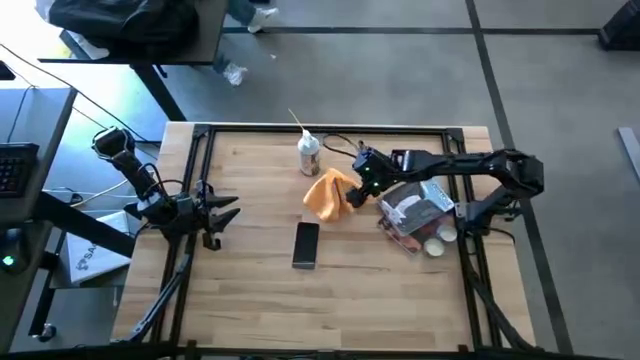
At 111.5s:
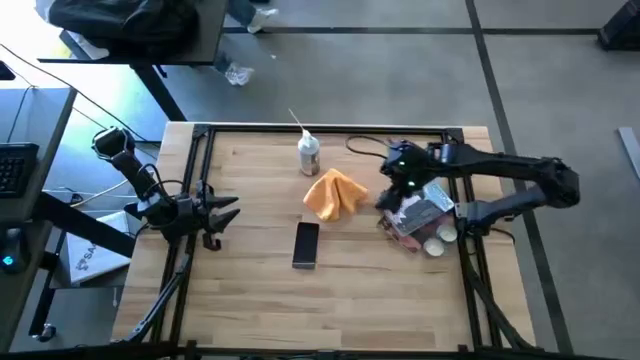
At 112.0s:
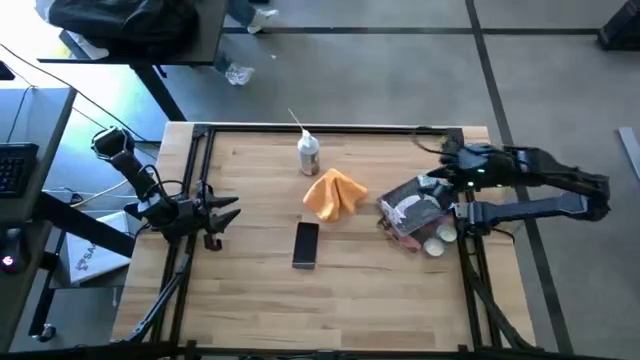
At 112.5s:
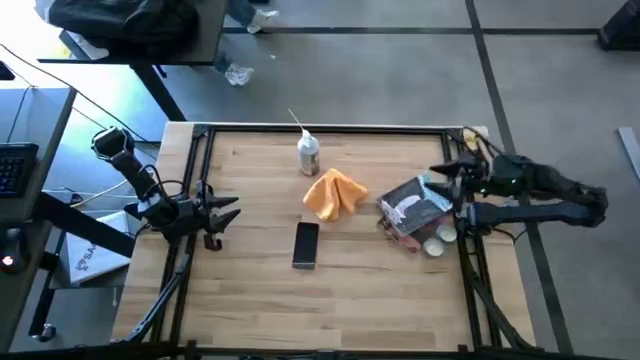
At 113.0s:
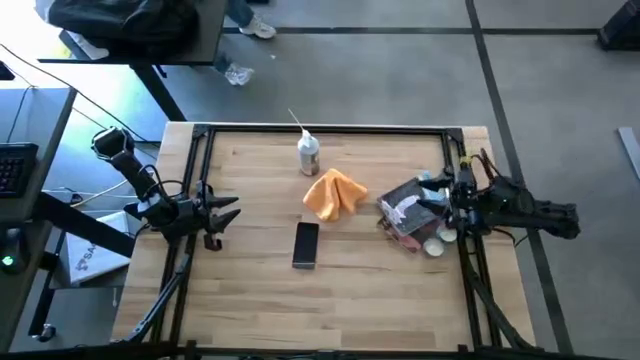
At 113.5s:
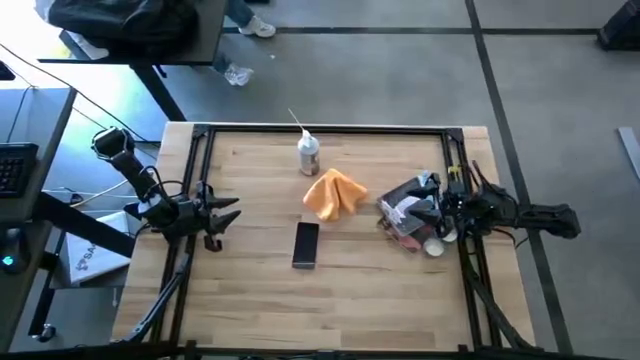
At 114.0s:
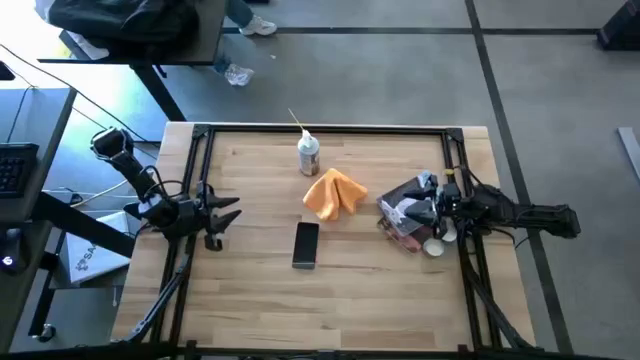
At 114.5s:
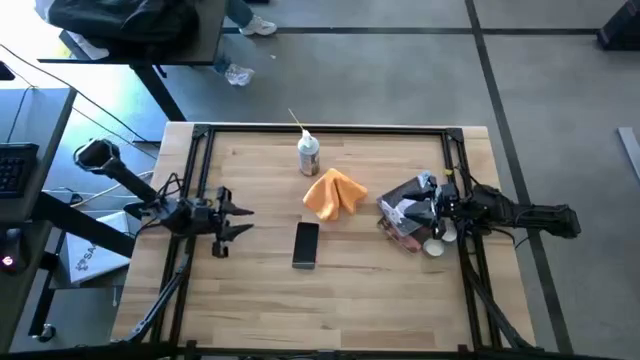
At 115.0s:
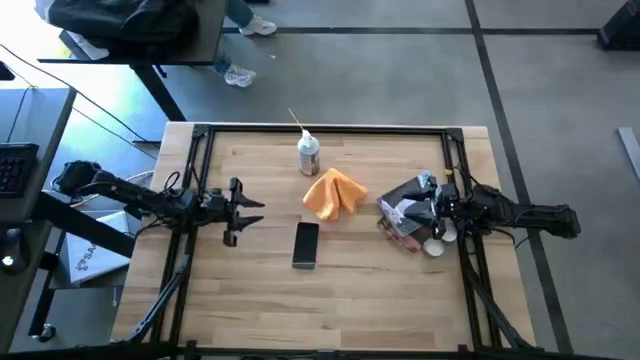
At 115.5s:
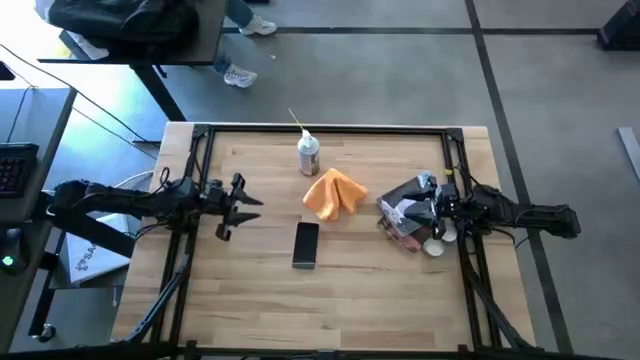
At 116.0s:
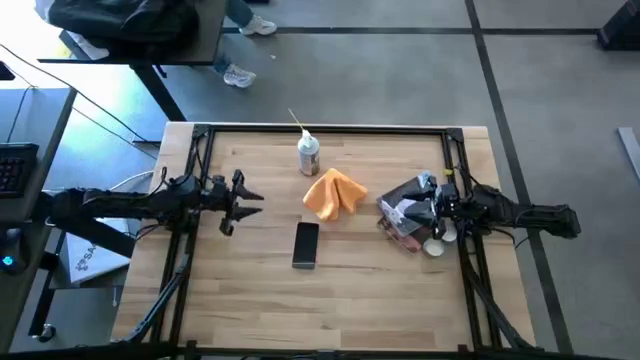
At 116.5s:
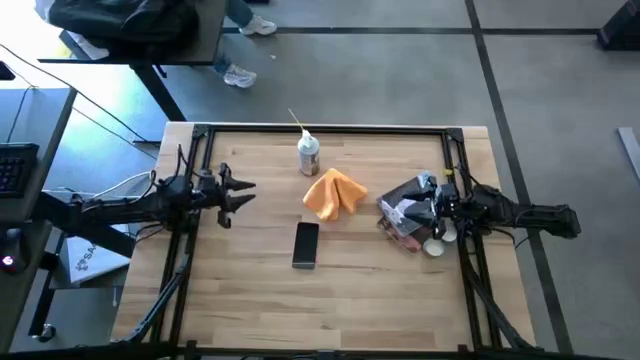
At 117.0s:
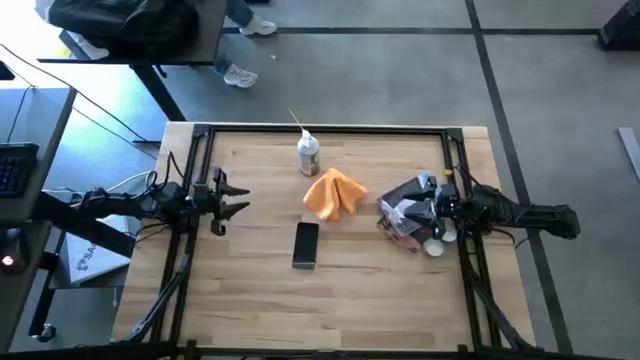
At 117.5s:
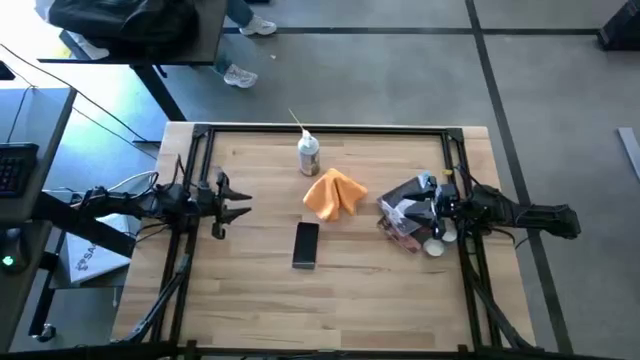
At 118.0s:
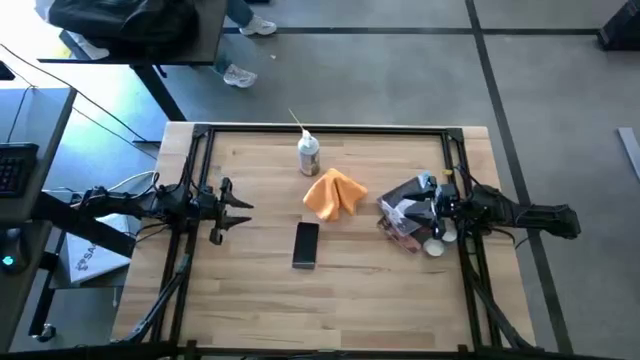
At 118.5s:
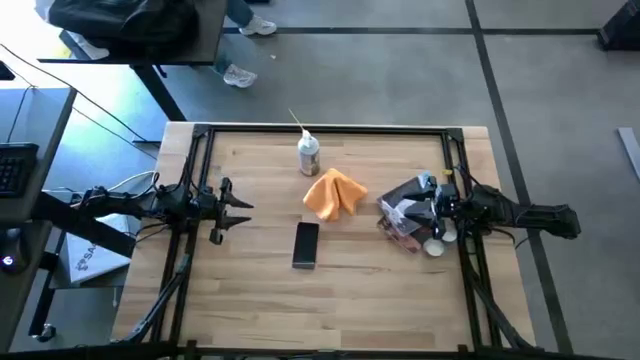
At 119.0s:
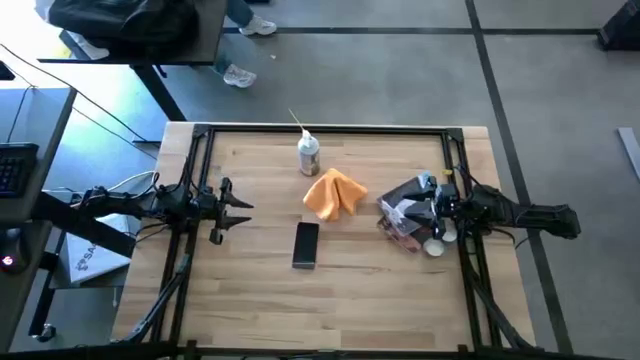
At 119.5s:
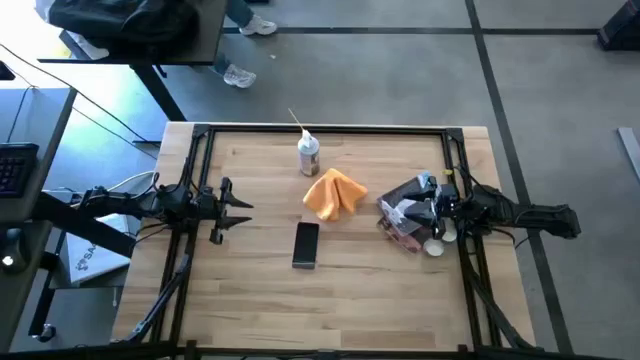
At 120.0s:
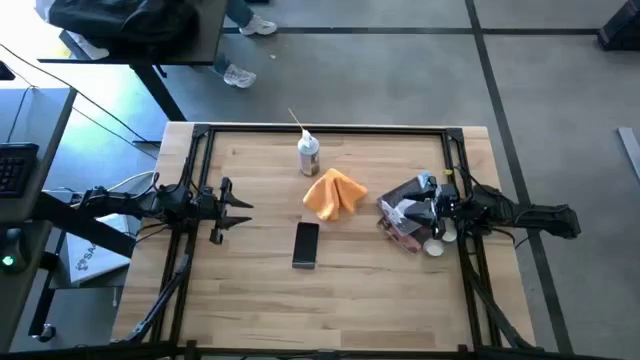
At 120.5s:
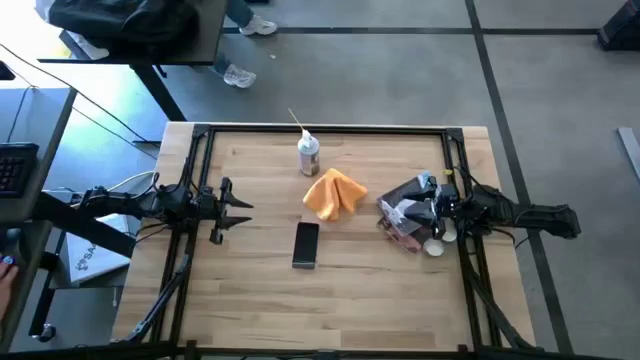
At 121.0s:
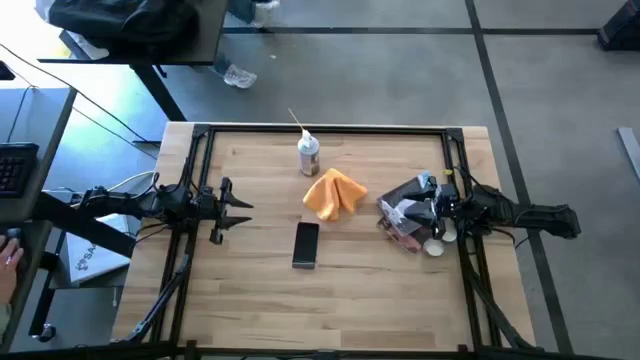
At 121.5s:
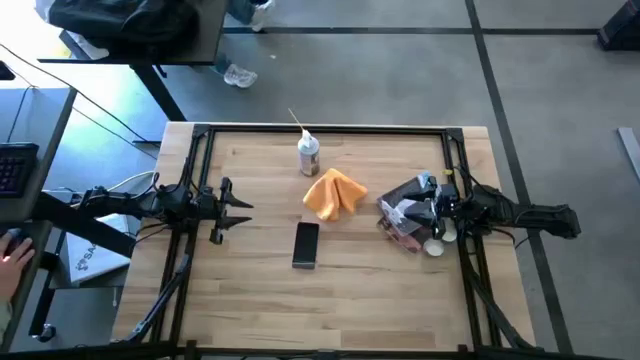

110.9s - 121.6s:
Task: Apply microfiber cloth
Return to Home Position

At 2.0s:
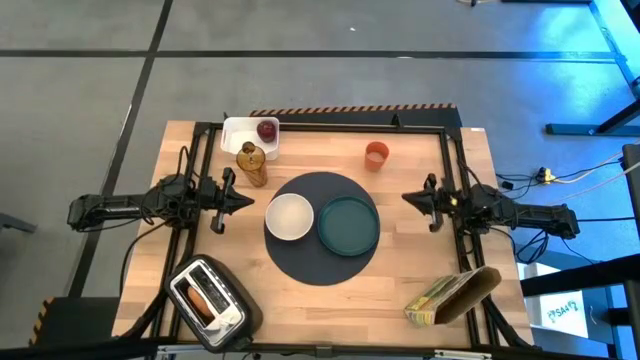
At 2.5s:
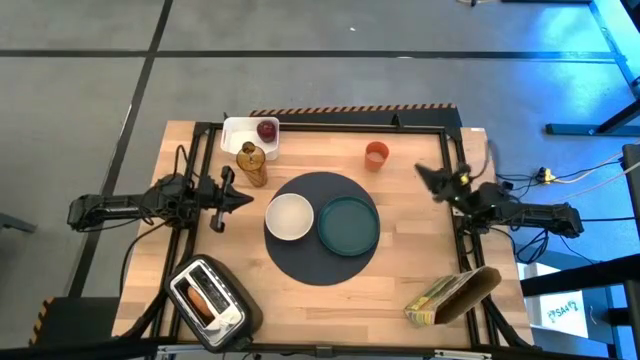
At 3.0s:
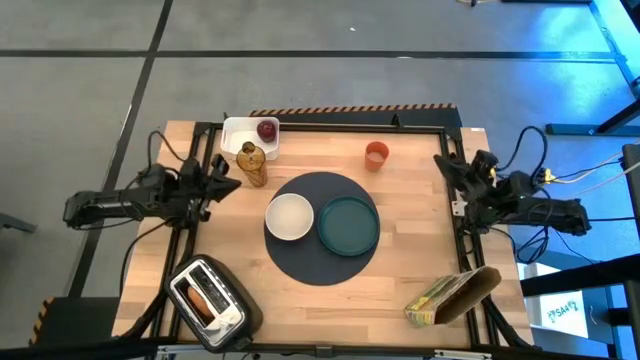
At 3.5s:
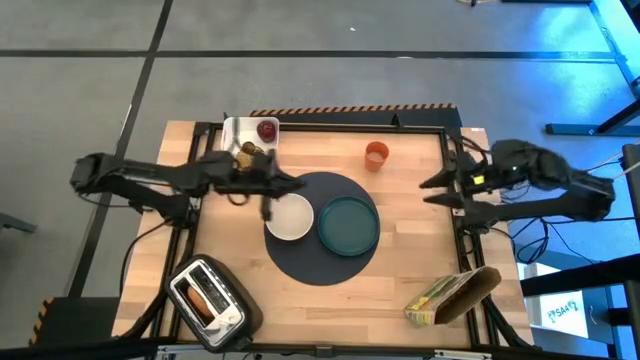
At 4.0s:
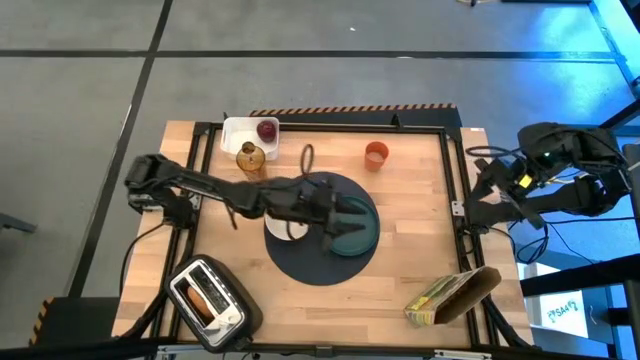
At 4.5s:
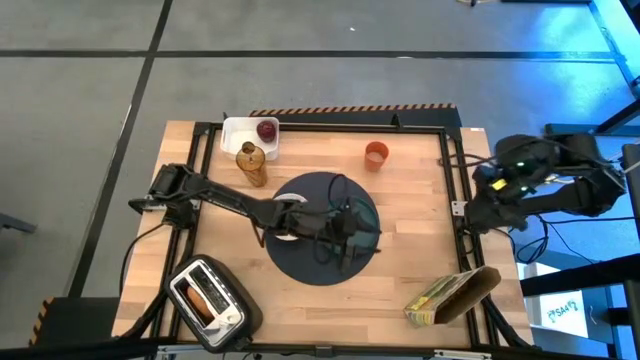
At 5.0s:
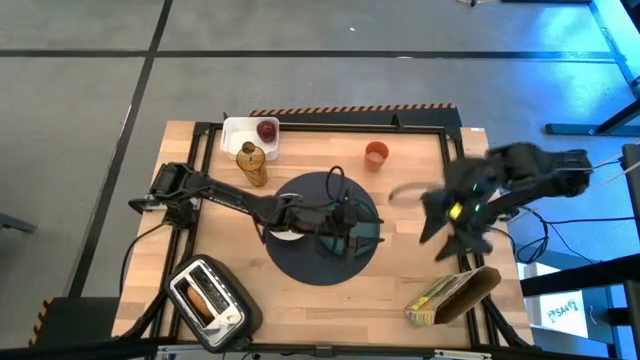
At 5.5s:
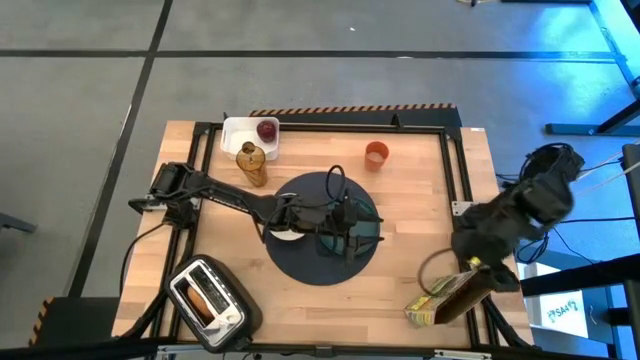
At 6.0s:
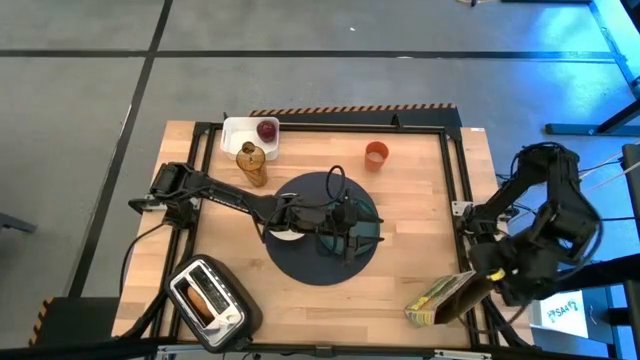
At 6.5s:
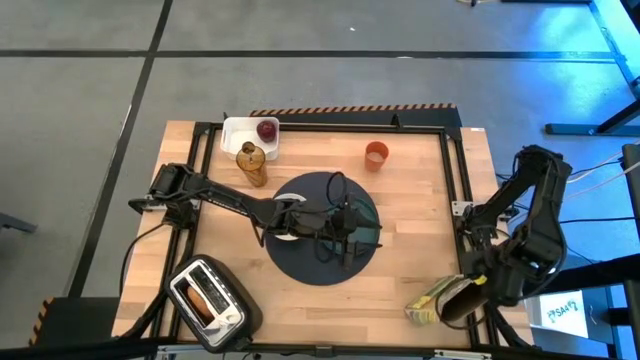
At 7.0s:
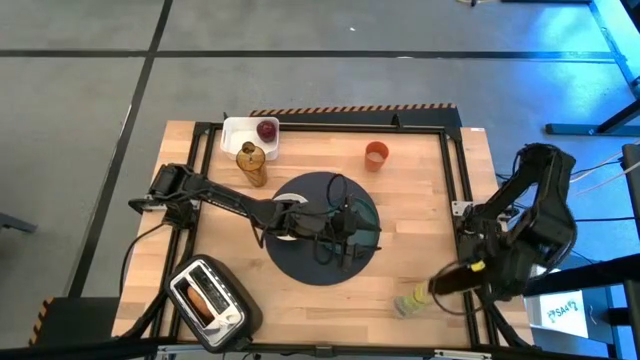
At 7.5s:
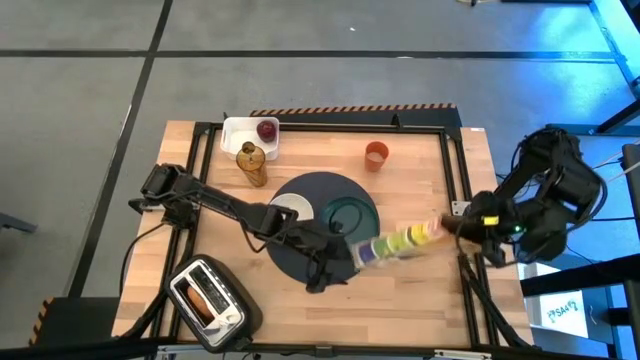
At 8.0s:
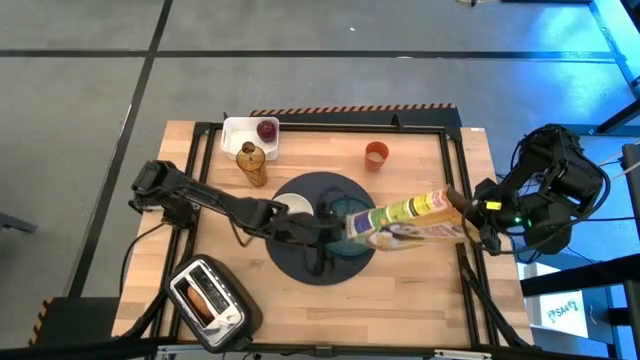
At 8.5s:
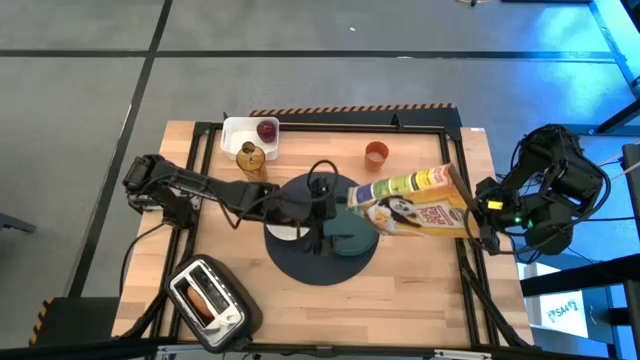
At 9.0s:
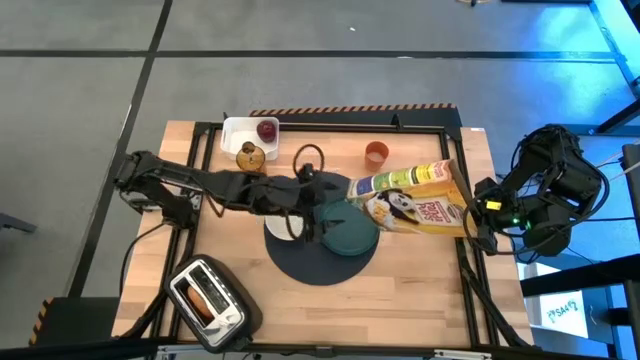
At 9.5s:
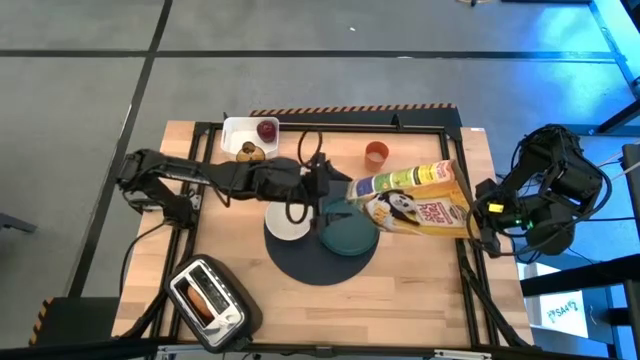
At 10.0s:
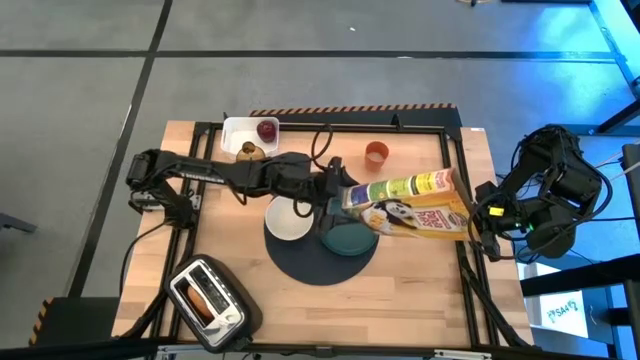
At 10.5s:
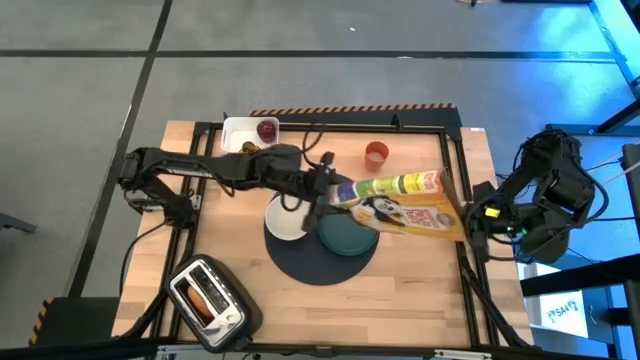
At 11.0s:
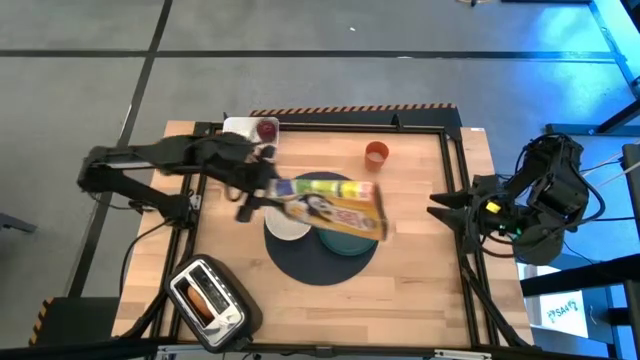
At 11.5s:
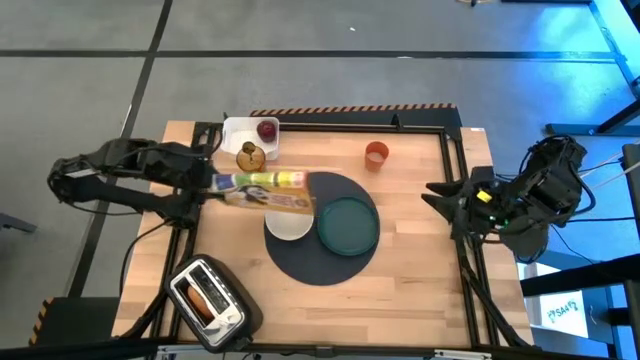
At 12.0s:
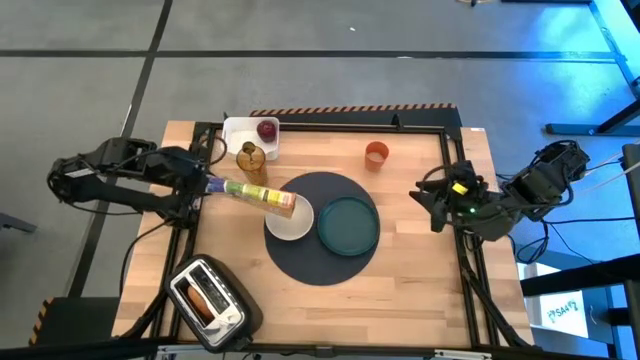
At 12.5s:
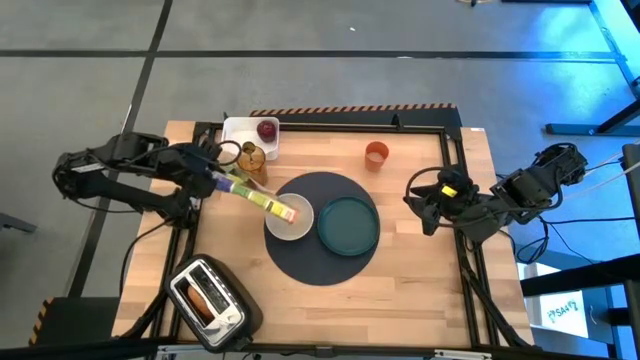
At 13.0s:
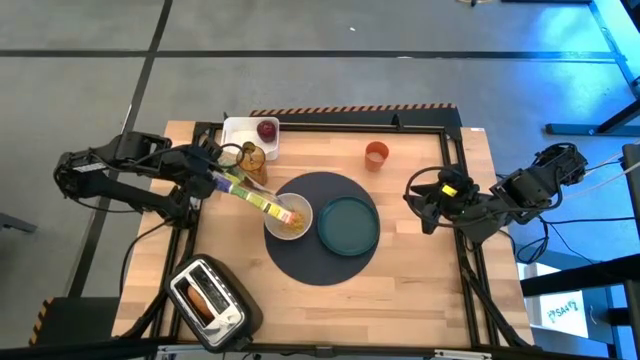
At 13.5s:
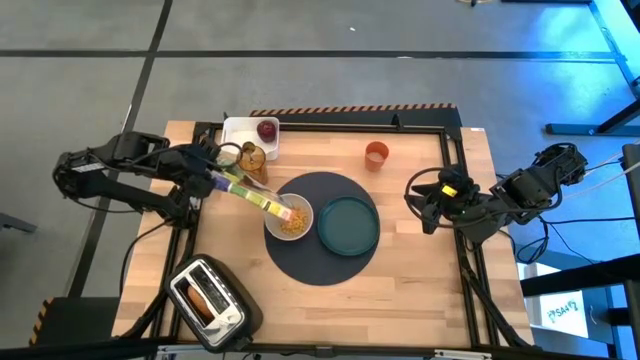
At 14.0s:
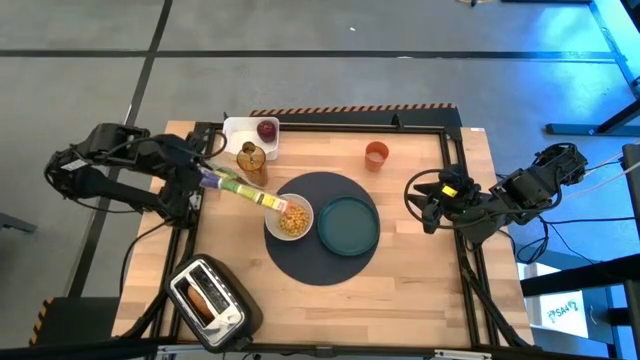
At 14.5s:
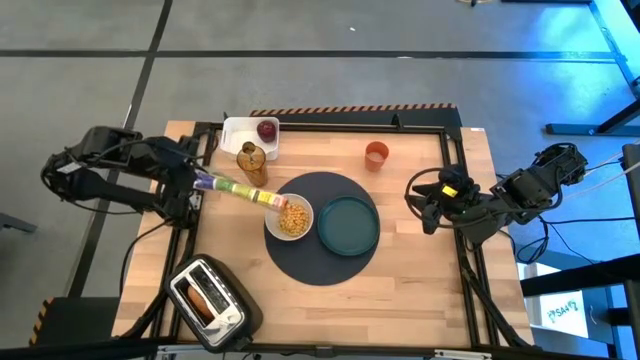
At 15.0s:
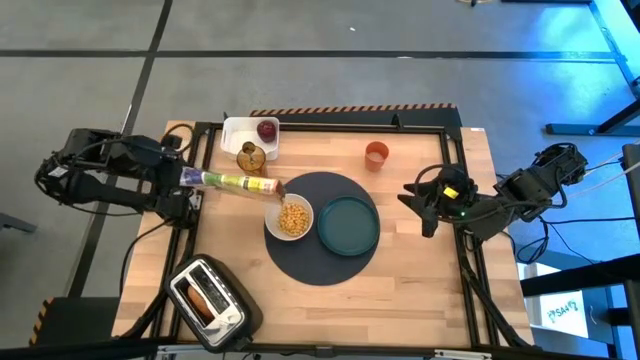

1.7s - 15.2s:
Task: Arrange a breakfast setting
Pour the cereal from the orange cereal box into the white bowl
